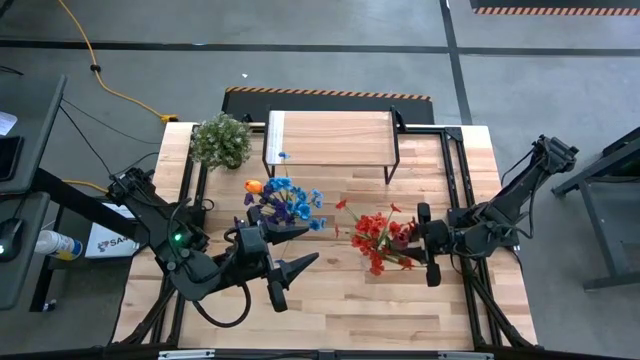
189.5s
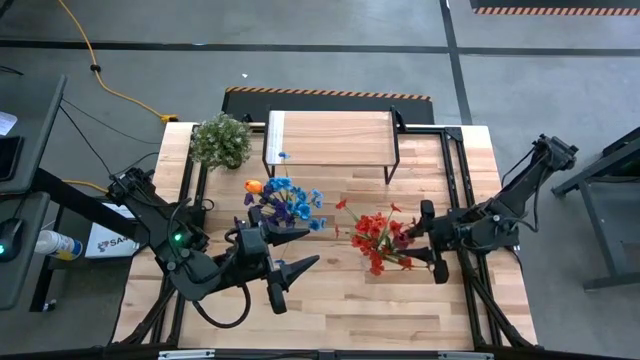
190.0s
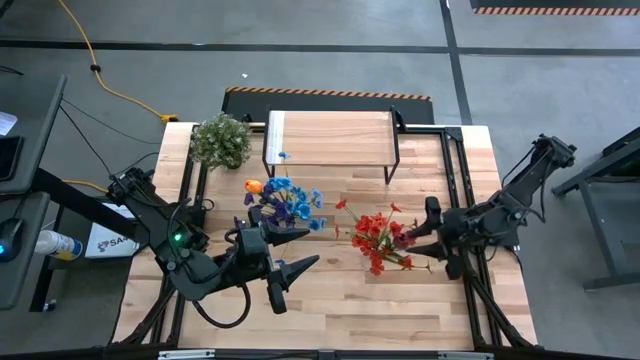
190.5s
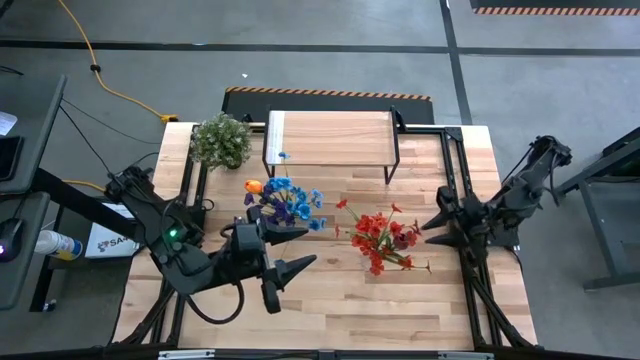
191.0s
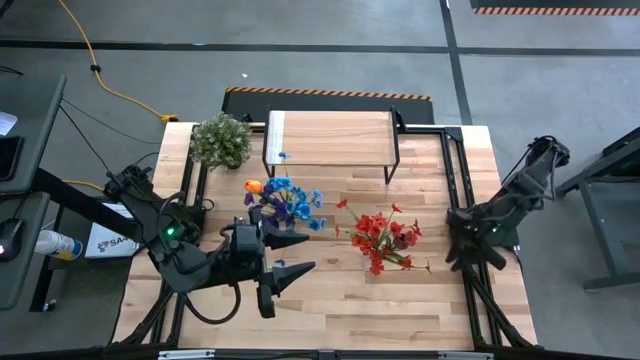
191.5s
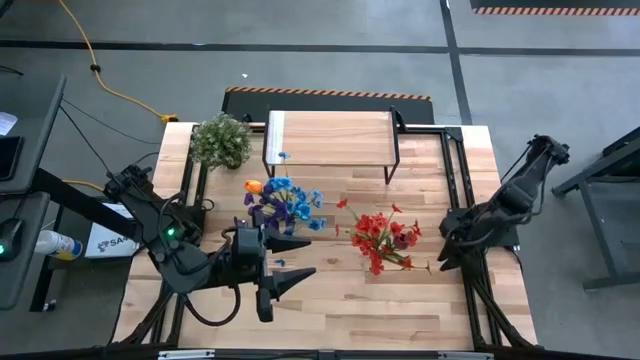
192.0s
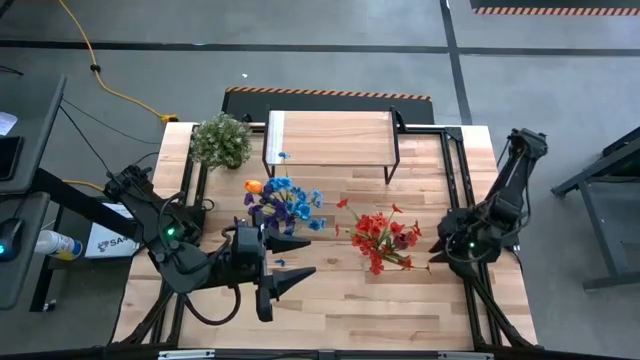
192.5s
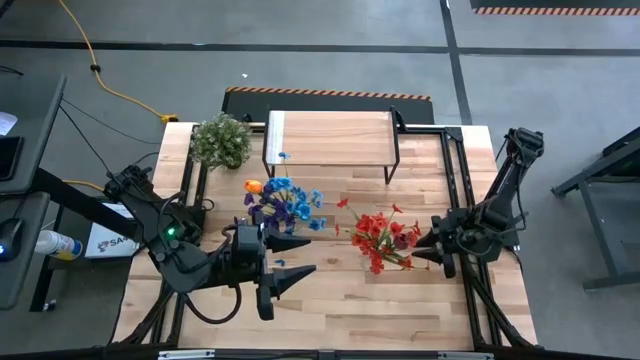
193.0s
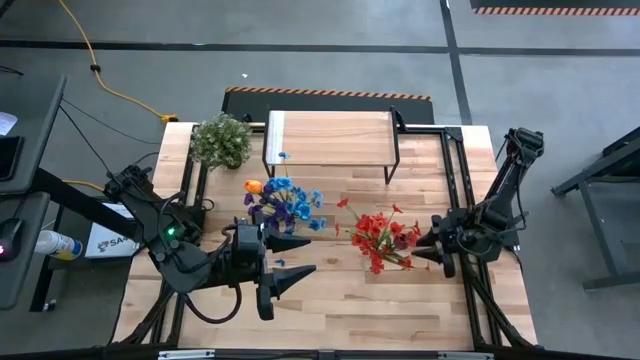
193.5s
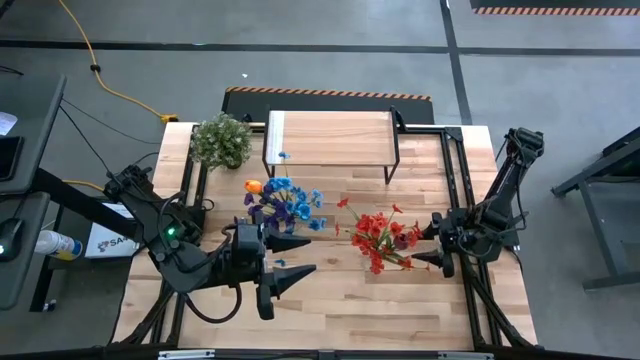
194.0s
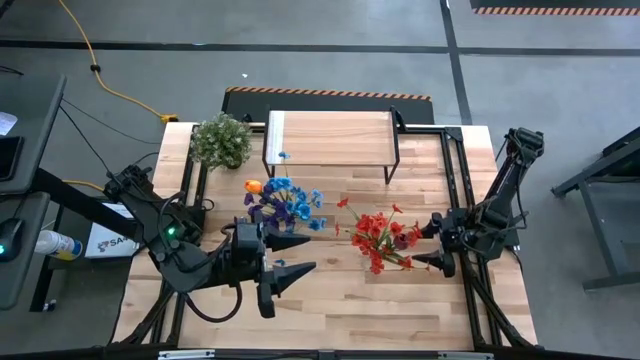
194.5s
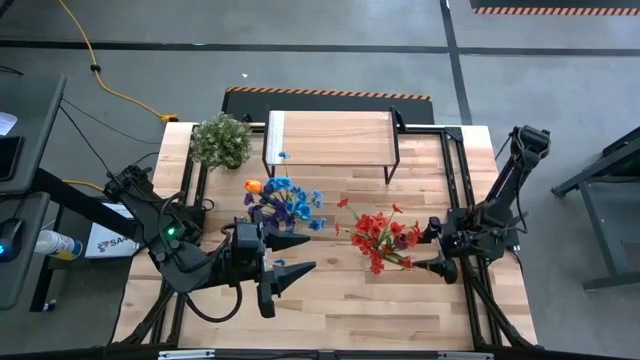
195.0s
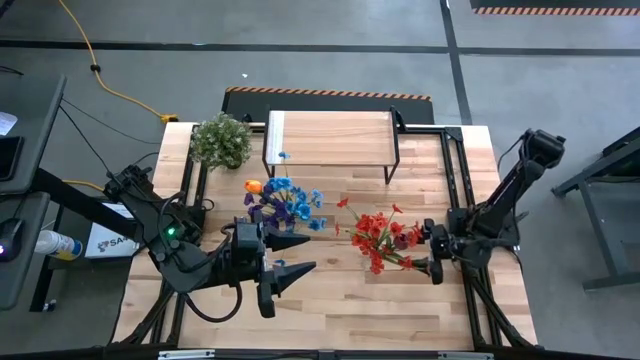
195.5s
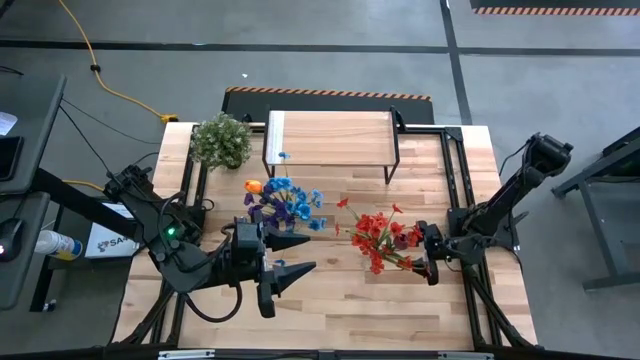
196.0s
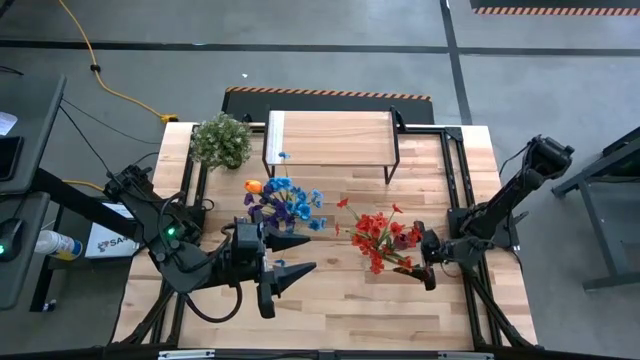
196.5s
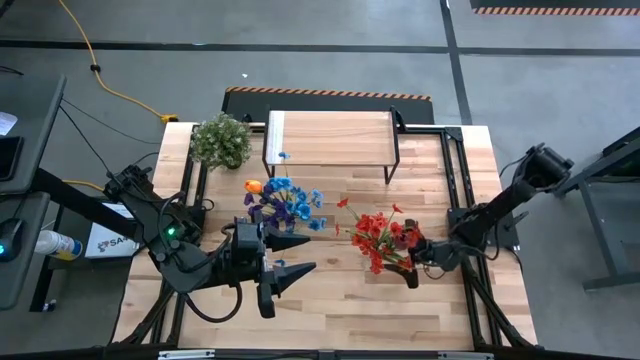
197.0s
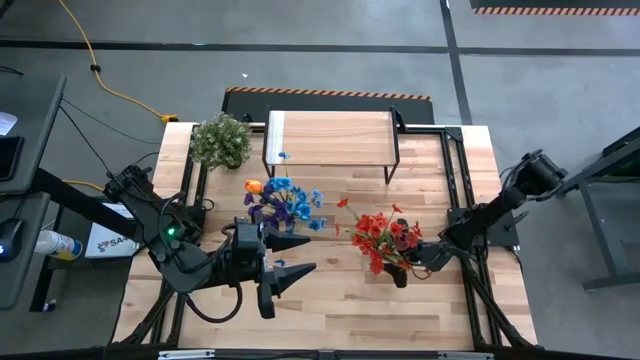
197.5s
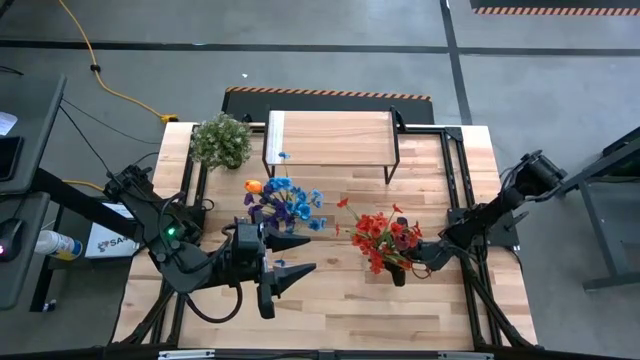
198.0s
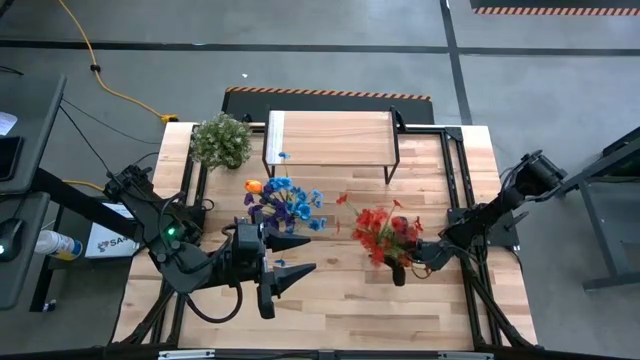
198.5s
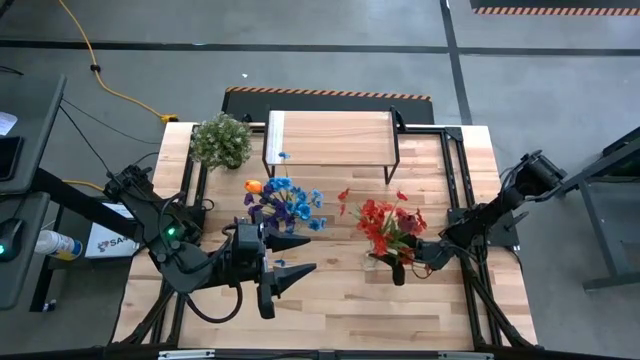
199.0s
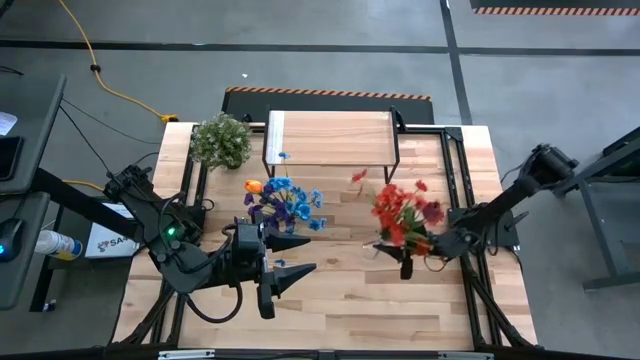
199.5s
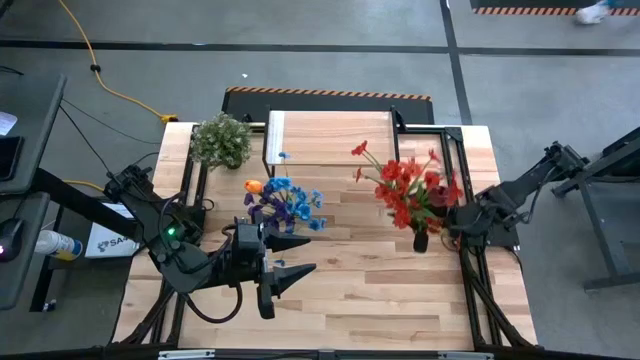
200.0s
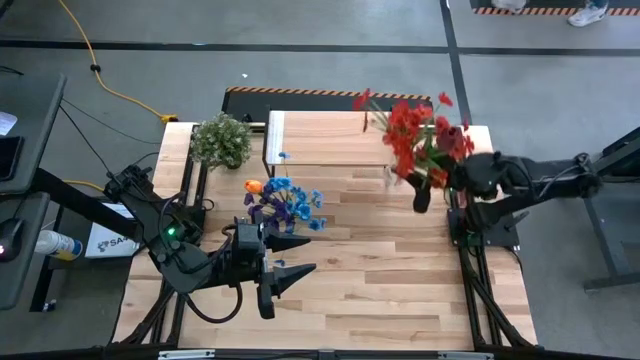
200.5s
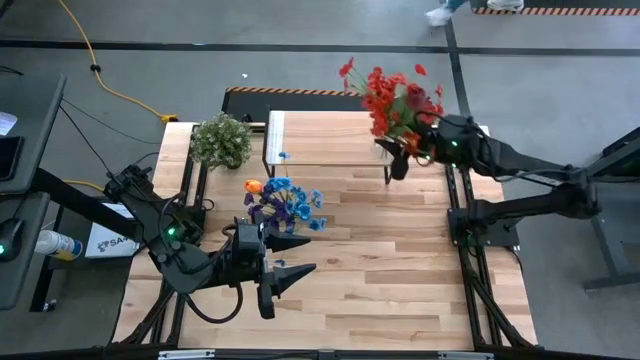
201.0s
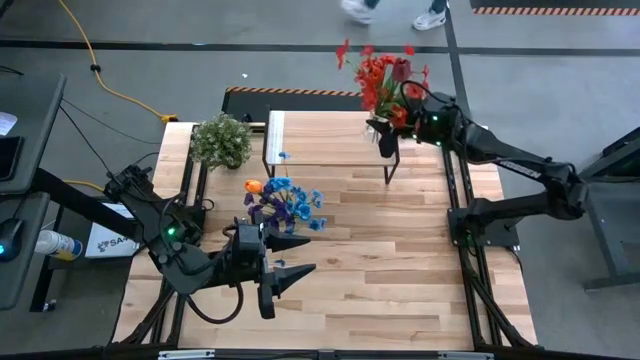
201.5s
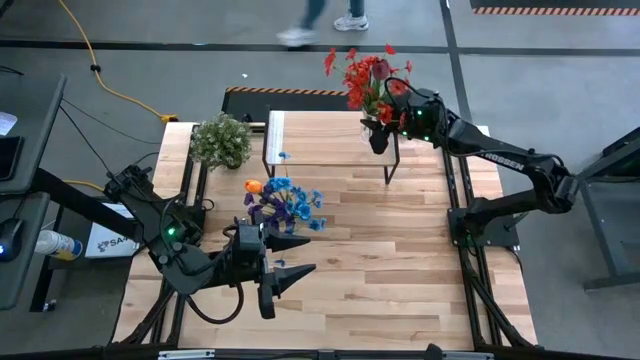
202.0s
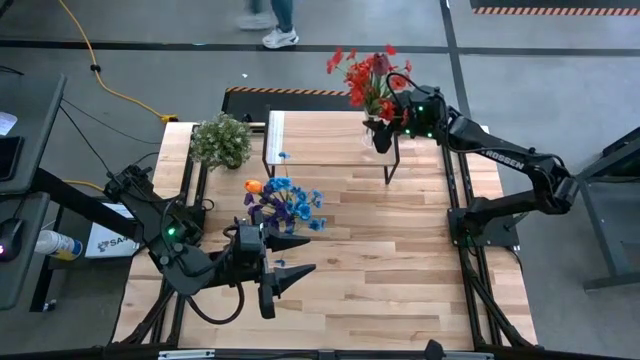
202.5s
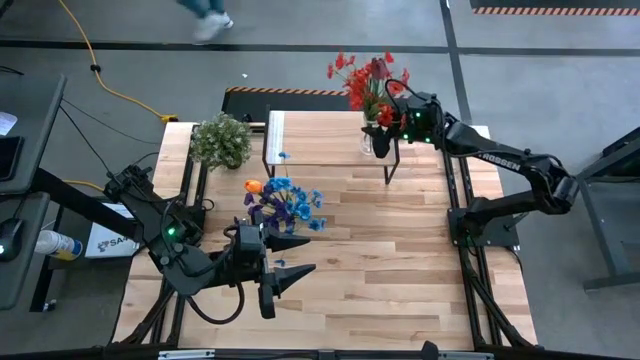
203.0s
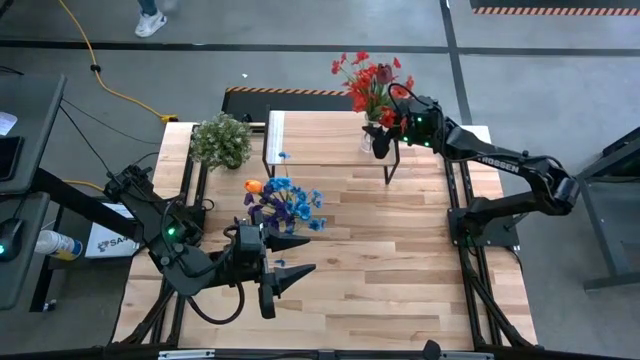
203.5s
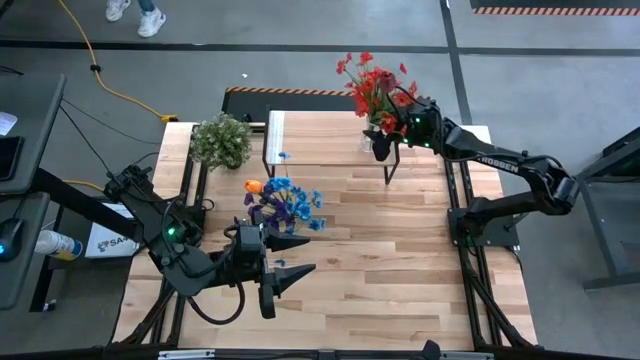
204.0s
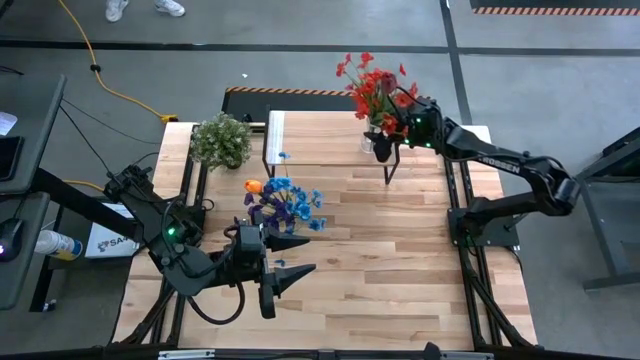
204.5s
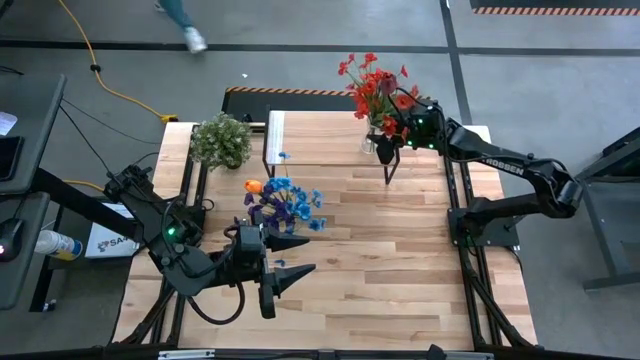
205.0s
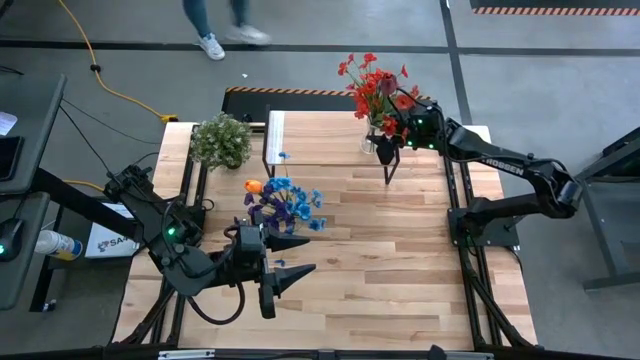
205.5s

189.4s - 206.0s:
Task: Pick and place flowers into a vace then onto a shelf
Put the right transparent vase on the shelf

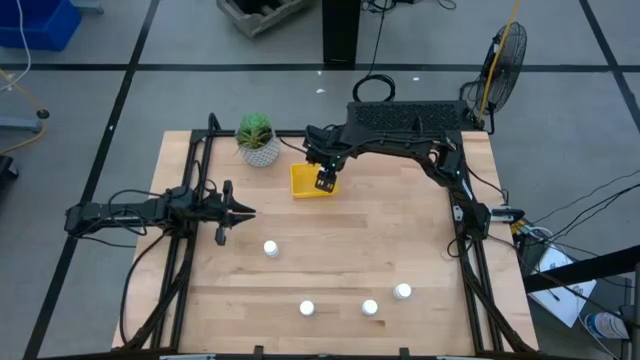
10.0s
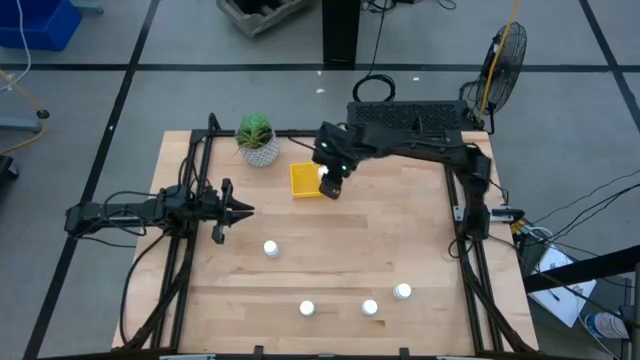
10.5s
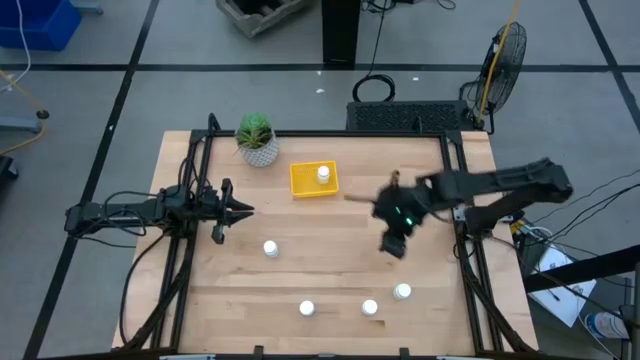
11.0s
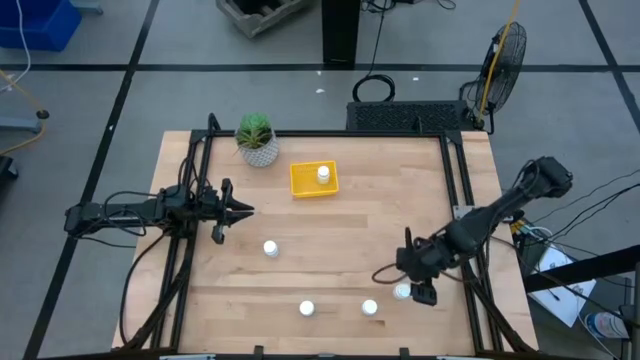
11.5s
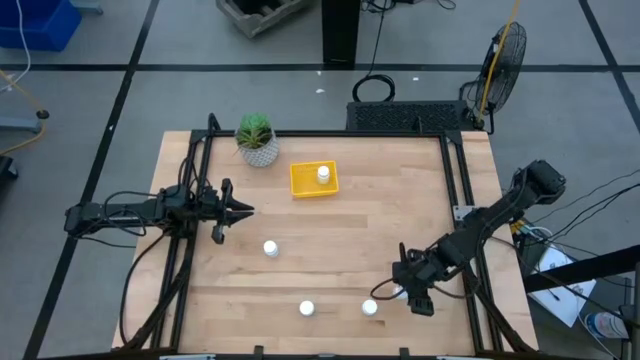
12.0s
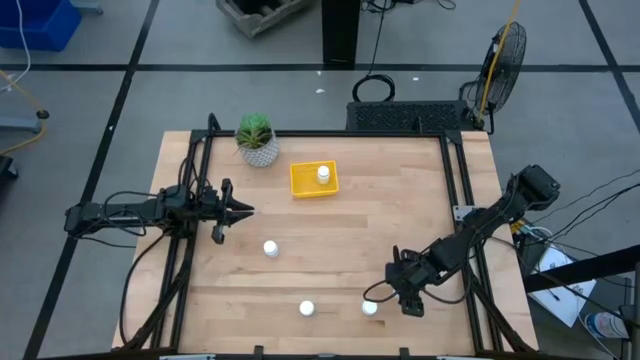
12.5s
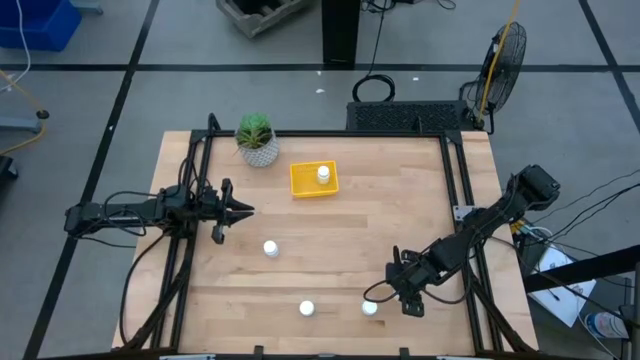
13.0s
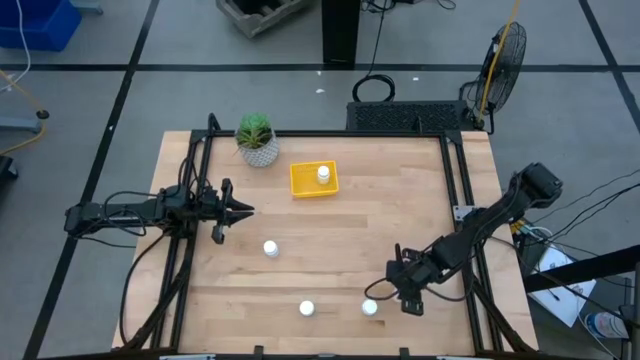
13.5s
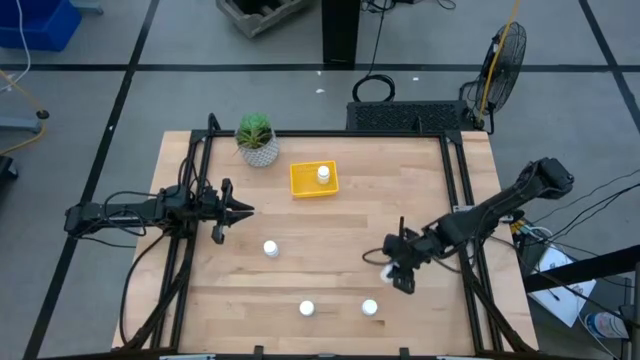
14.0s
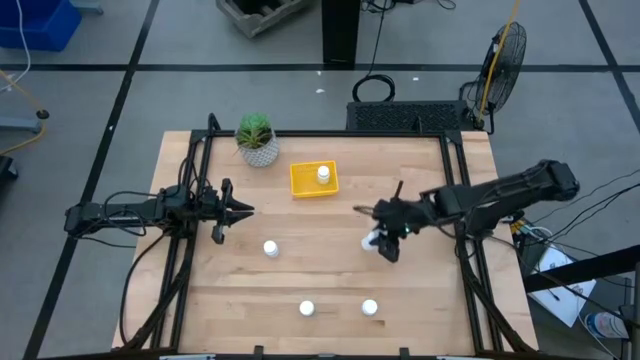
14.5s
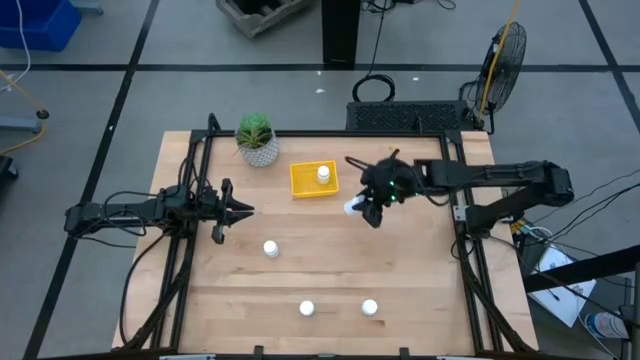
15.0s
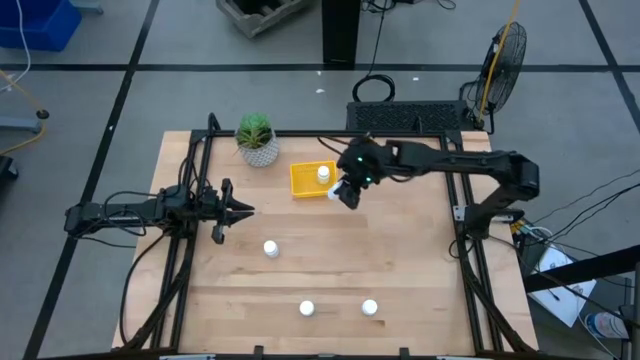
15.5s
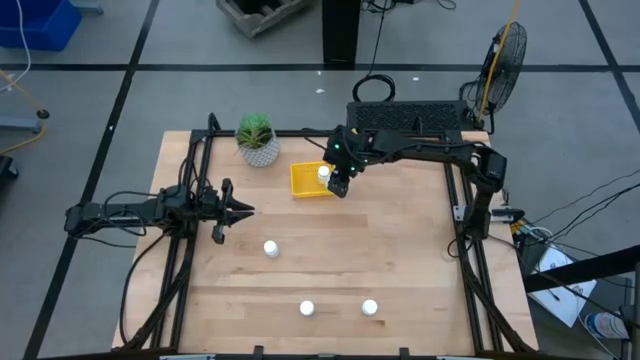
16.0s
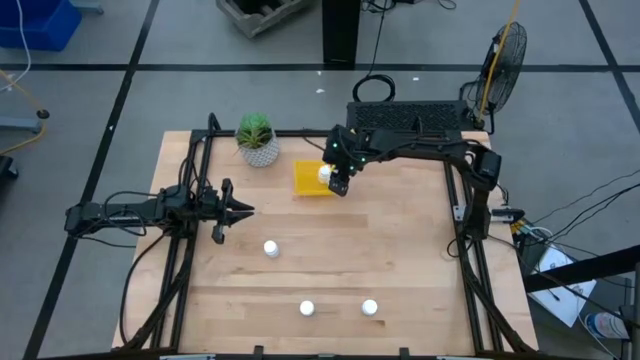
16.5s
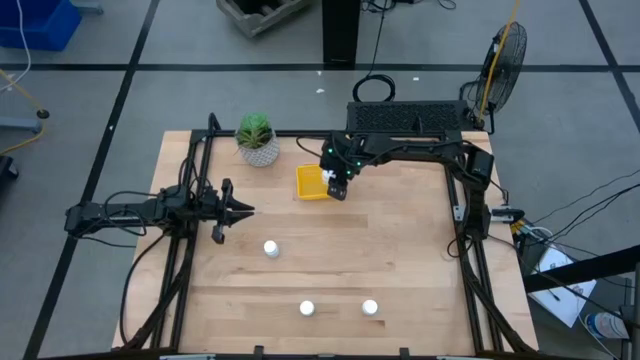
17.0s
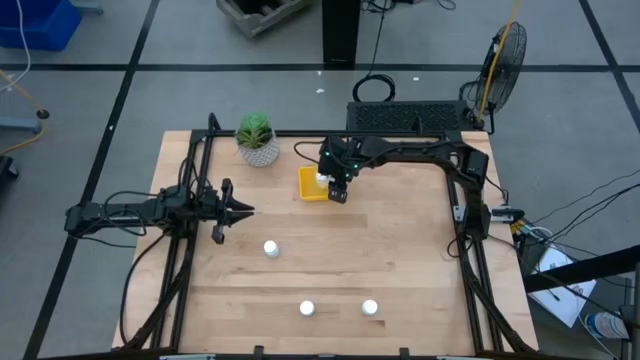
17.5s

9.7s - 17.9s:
Task: Pick and place pill bottles into a basket
Put the white pill bottle into the yellow basket
